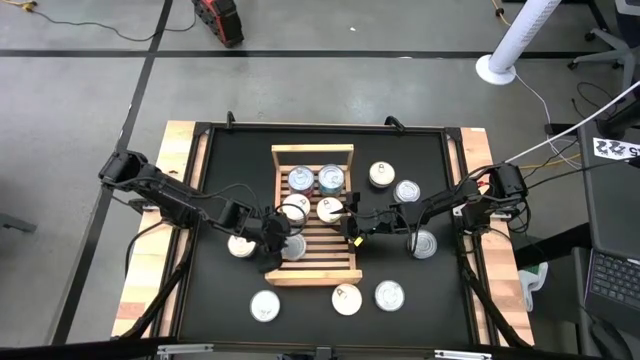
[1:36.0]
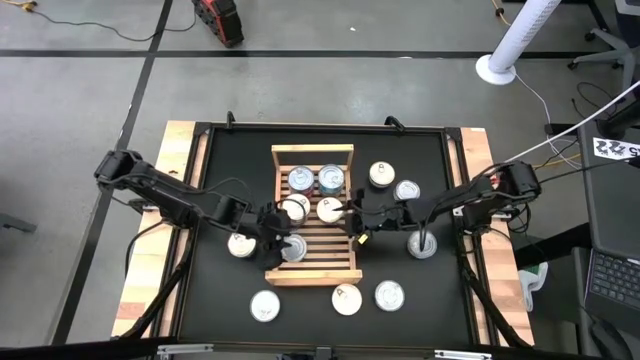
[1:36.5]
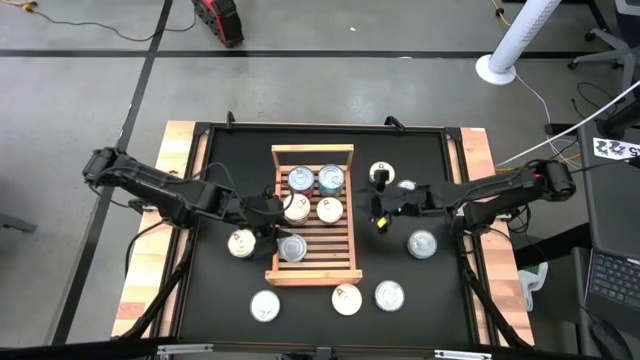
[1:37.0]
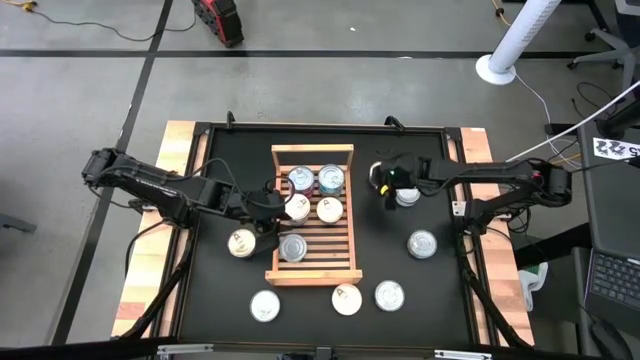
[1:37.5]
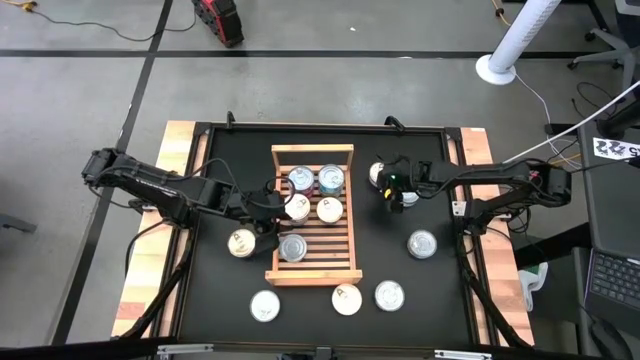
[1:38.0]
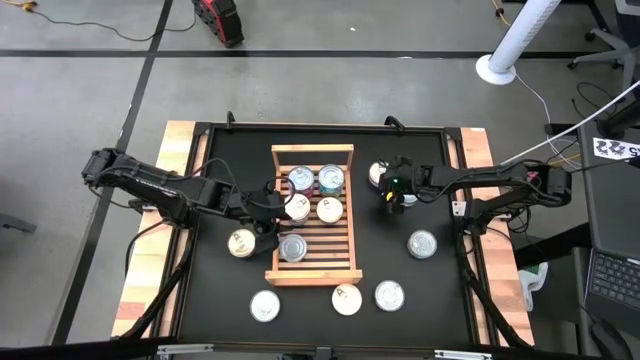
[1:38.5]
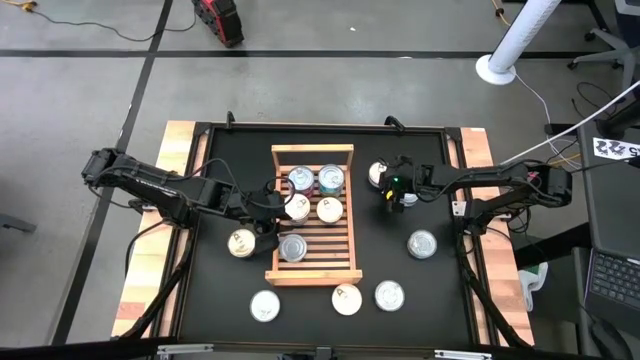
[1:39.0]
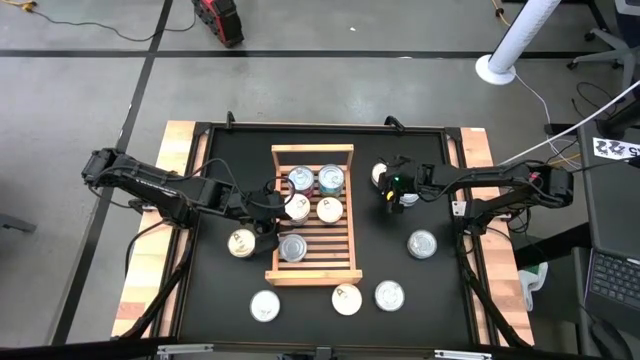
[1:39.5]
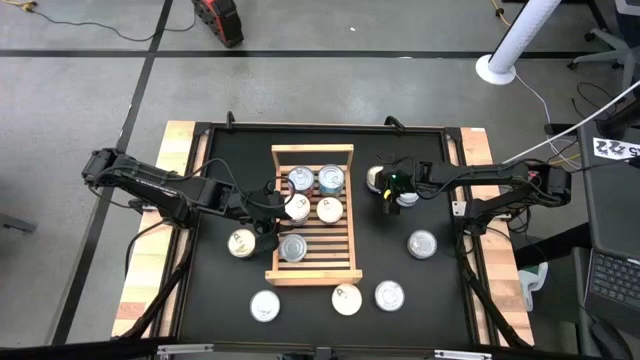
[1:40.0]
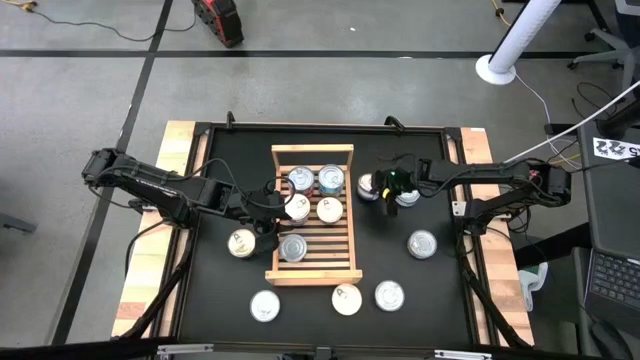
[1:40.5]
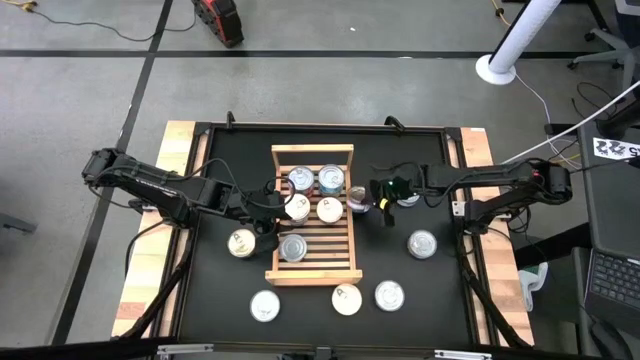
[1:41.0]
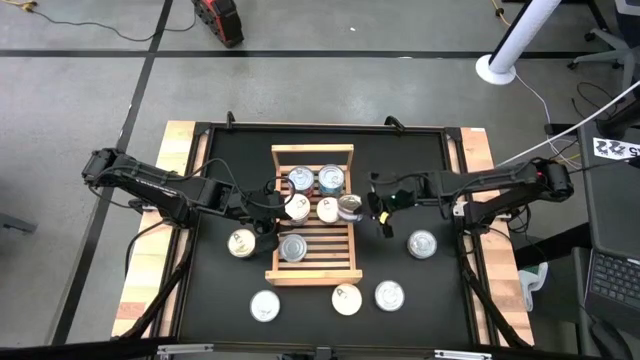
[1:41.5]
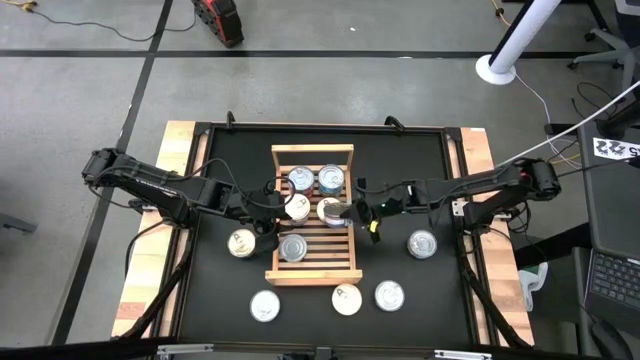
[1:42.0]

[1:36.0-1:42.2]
Task: Stack canned seafood by type on shelf
Put the blue-pink tuna can on the shelf

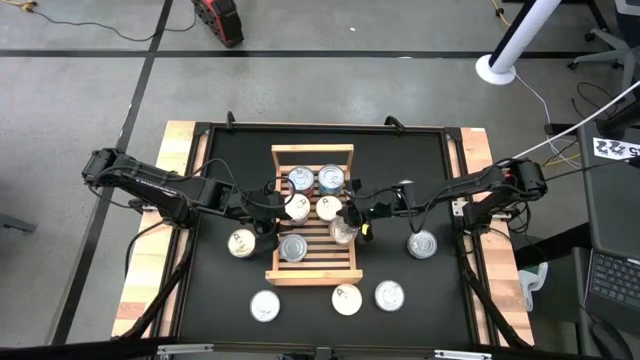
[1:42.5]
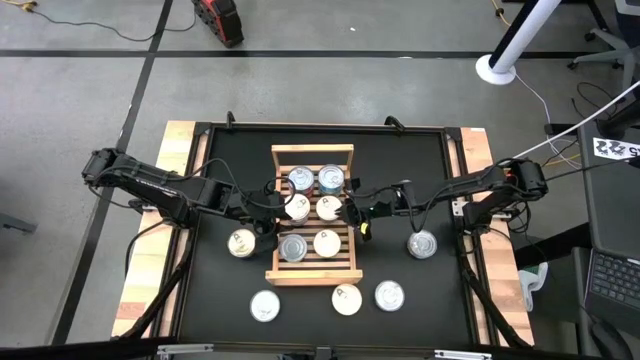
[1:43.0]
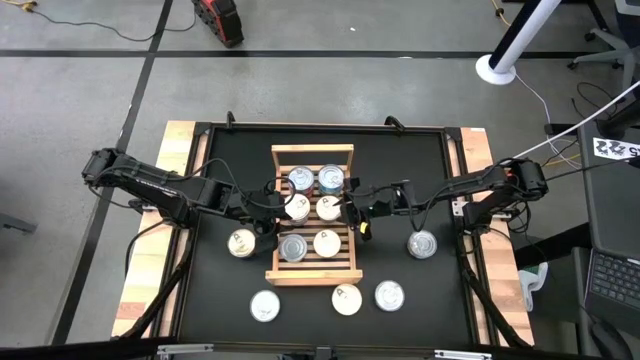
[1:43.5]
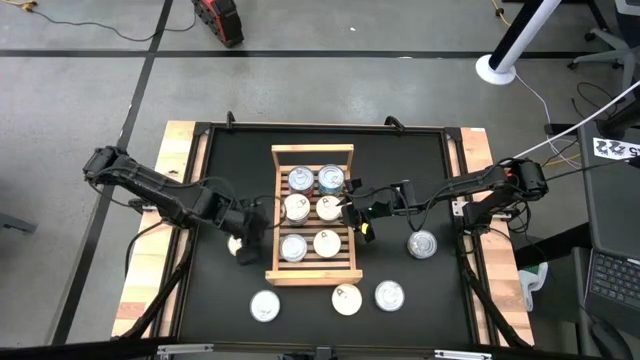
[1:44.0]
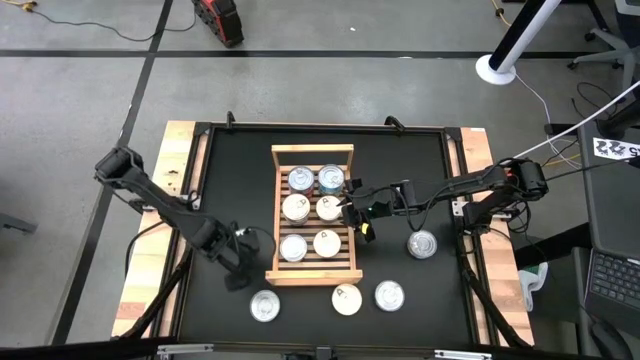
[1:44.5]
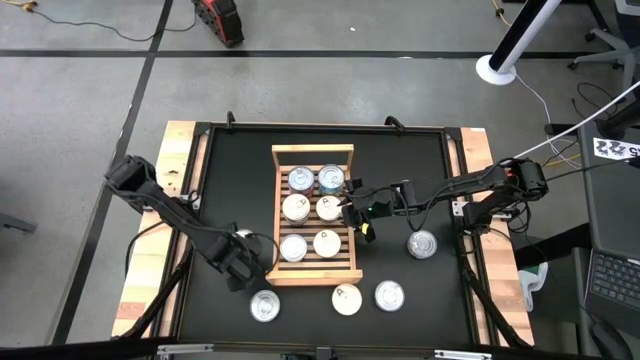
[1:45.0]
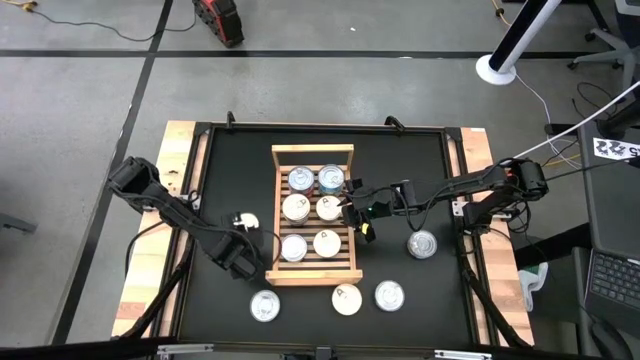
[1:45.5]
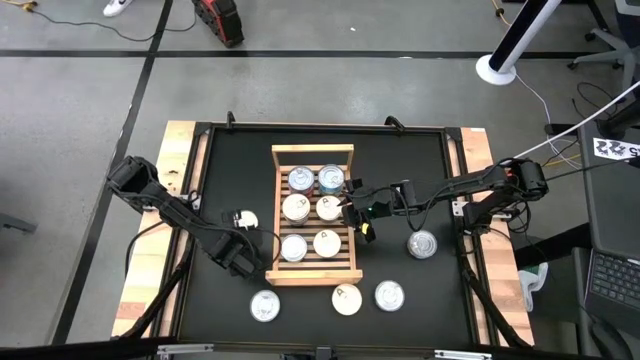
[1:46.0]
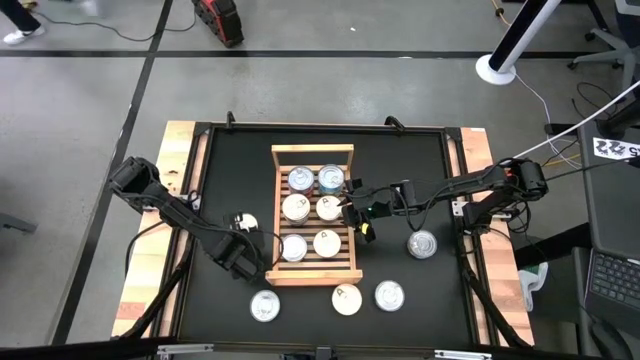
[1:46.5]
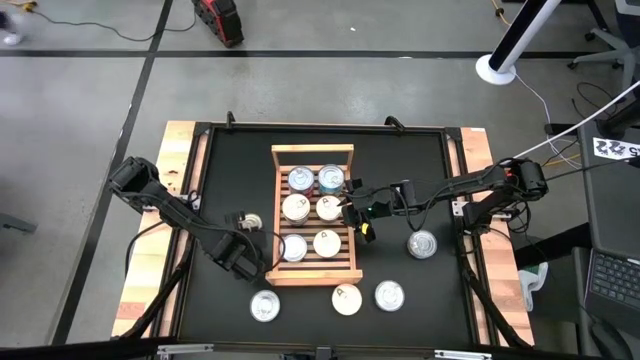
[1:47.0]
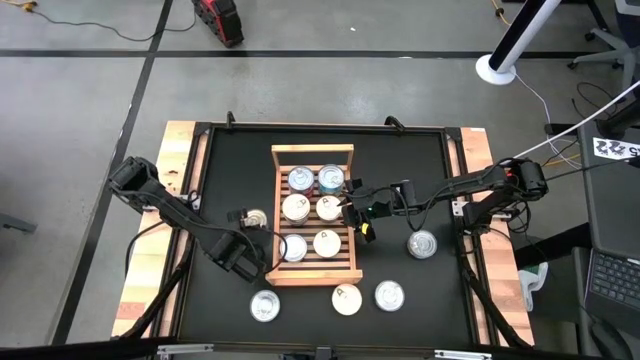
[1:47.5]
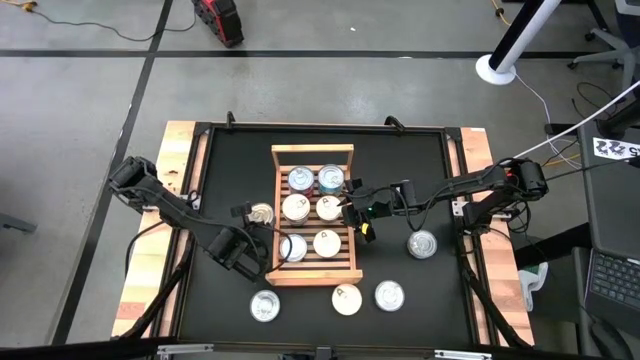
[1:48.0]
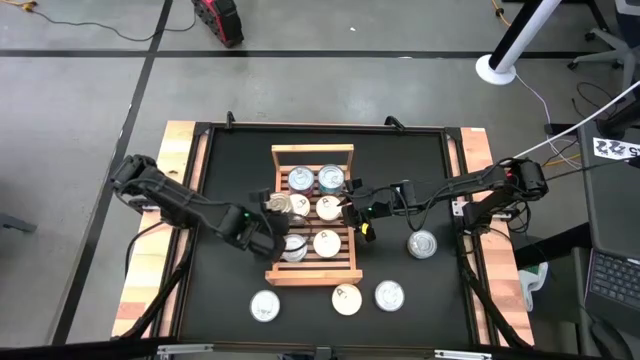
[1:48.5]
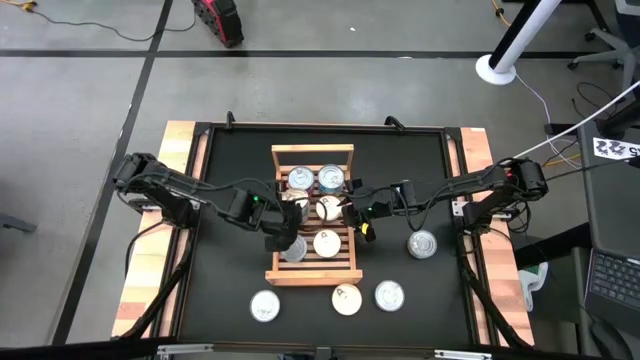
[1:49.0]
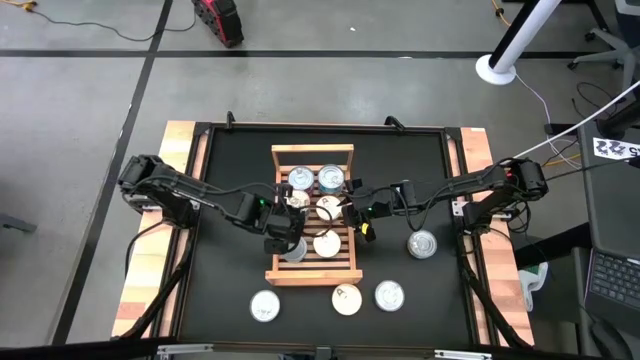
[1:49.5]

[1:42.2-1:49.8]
Stack the blue-pink tuna can on top of the other blue-pink tuna cans on the shelf

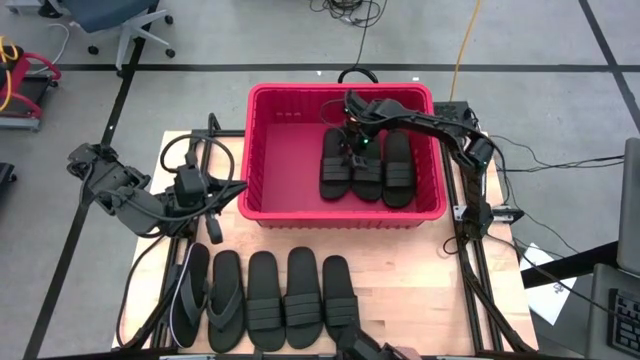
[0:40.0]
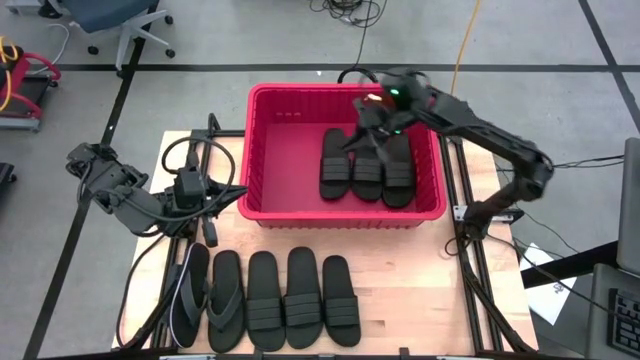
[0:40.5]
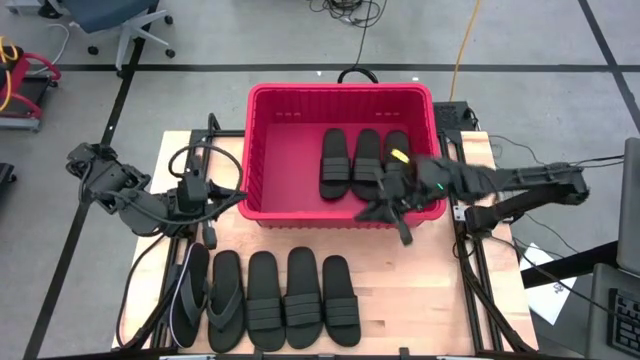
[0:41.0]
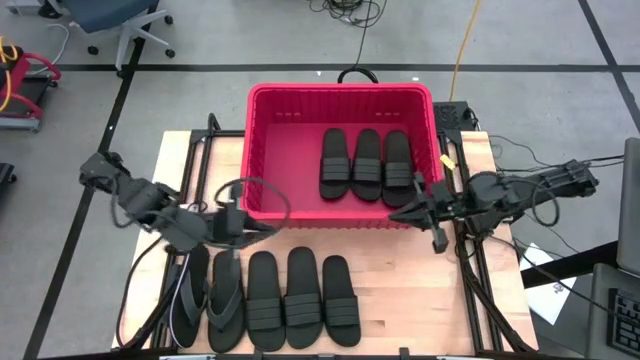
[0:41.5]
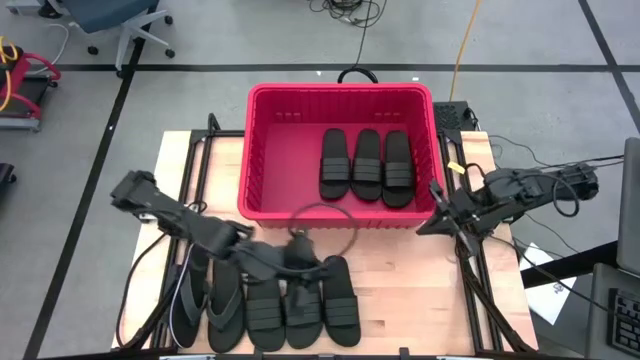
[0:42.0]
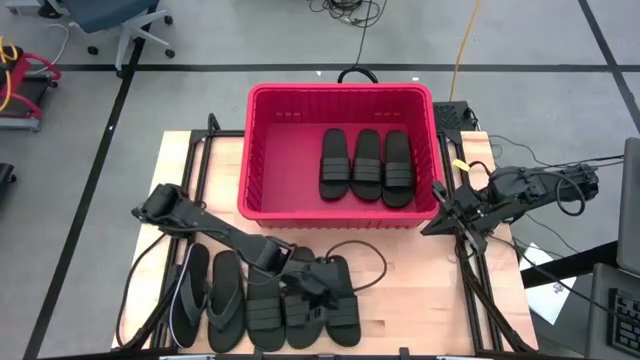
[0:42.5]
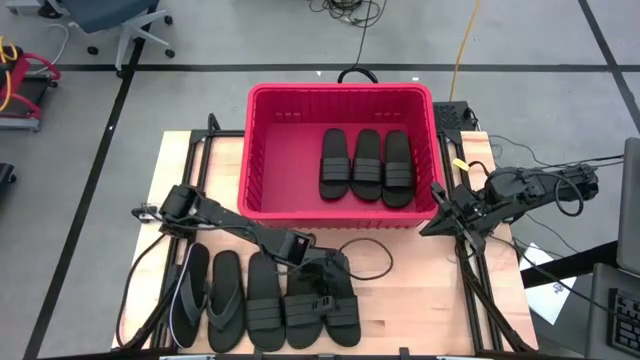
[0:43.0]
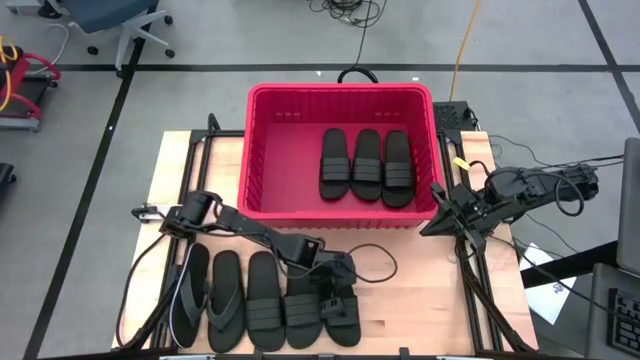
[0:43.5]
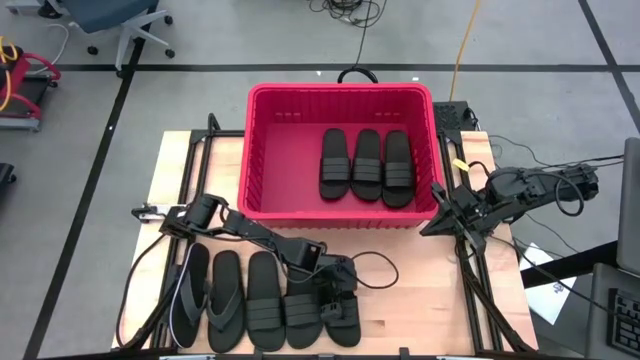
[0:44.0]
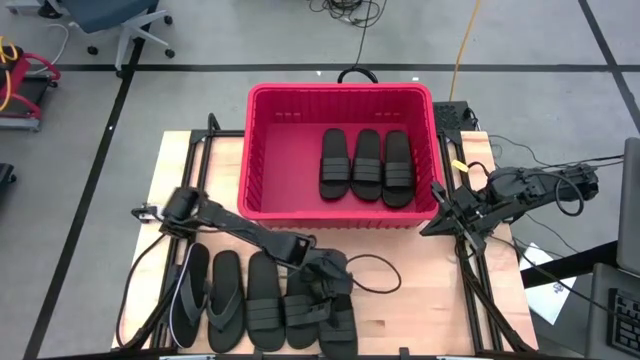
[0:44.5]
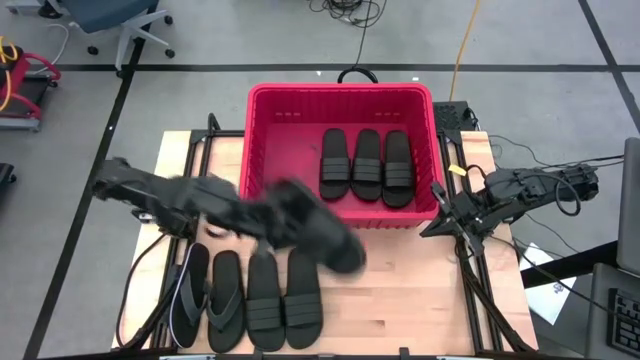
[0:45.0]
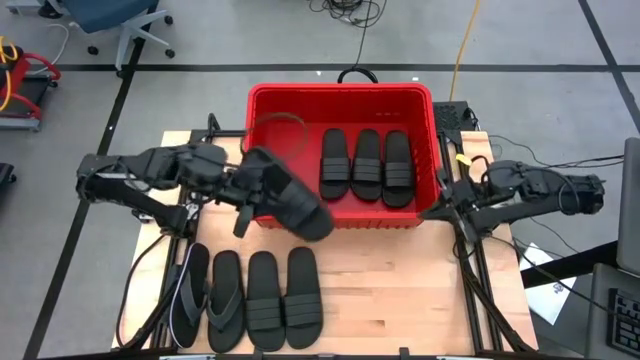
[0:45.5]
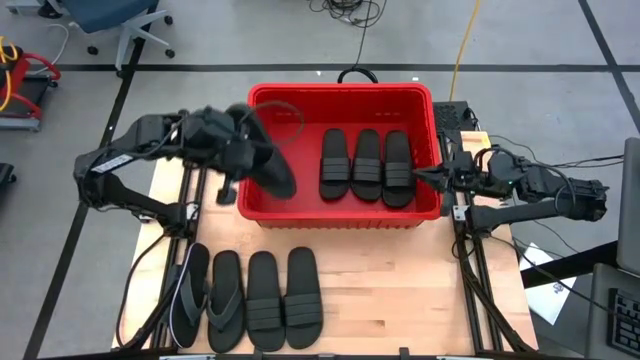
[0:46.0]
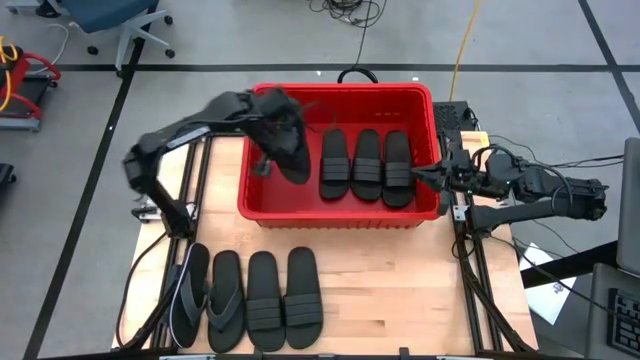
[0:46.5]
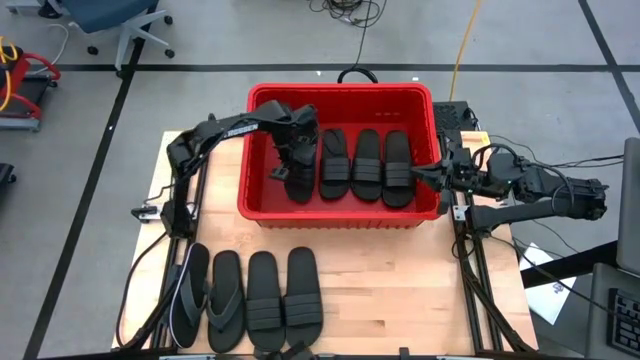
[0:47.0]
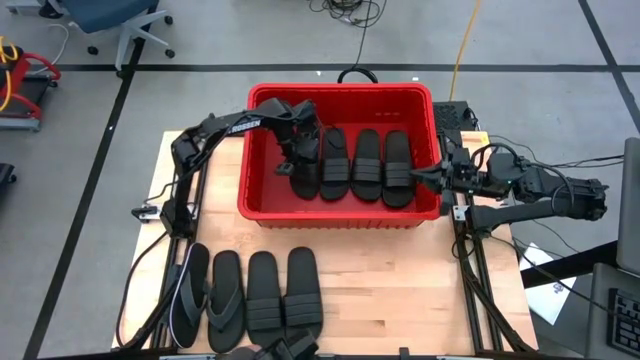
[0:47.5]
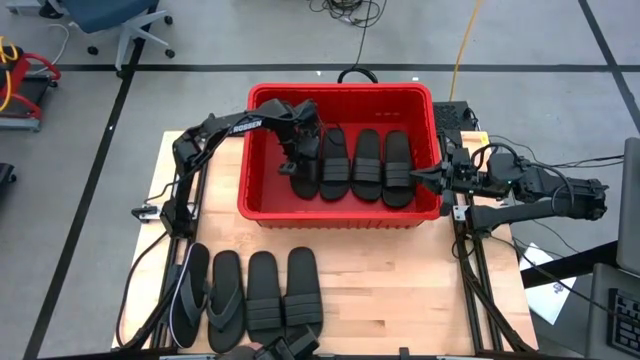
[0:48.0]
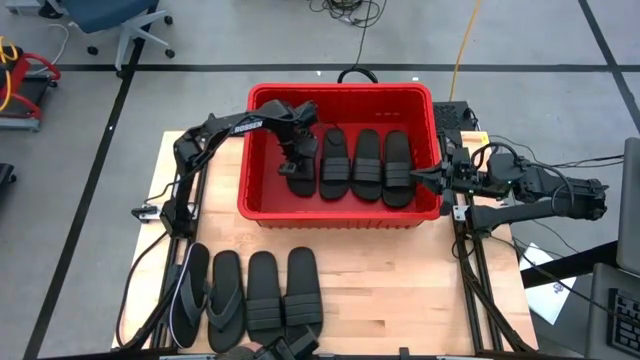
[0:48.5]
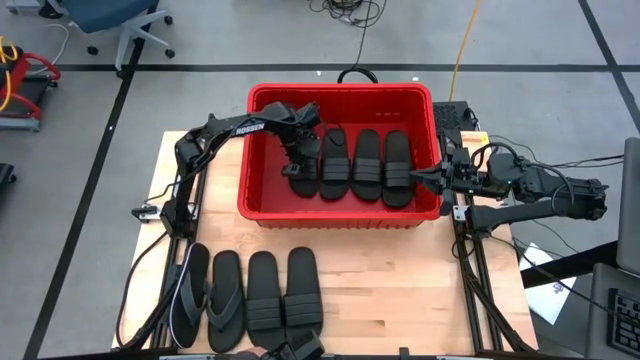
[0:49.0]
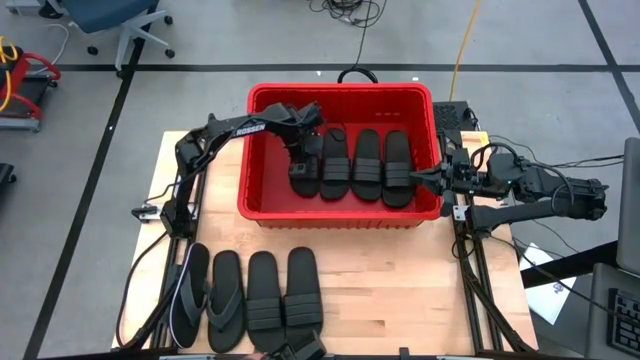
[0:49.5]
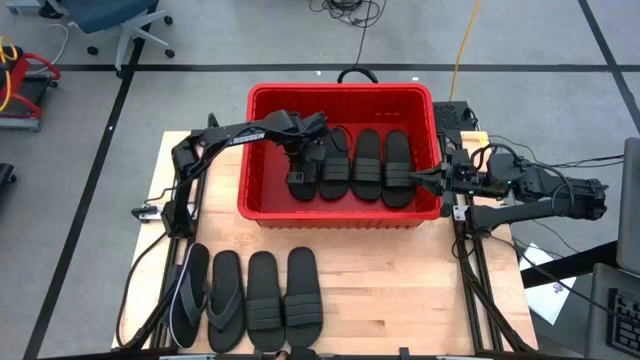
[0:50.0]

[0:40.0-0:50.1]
Task: Pick and place slides into bin
Put the black slide into the red bin
